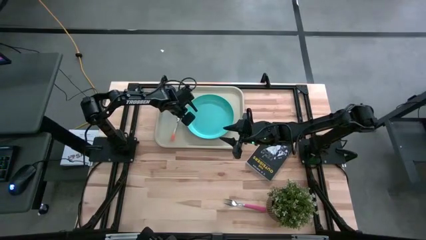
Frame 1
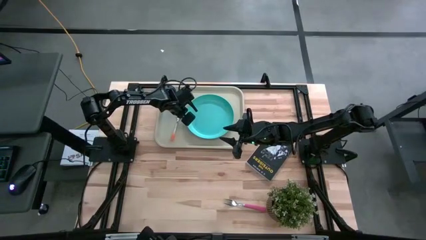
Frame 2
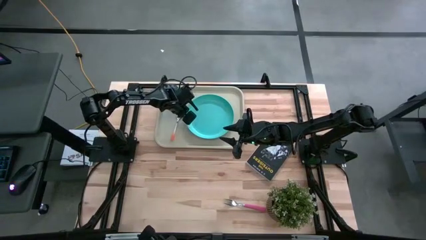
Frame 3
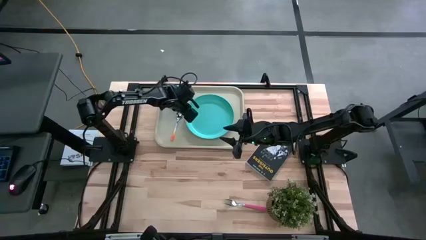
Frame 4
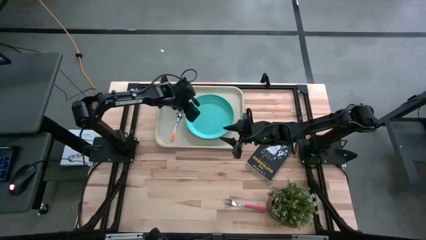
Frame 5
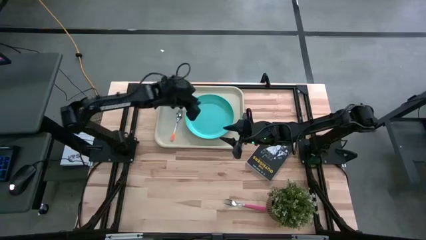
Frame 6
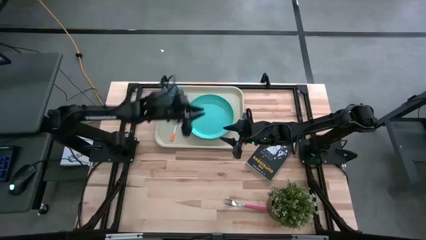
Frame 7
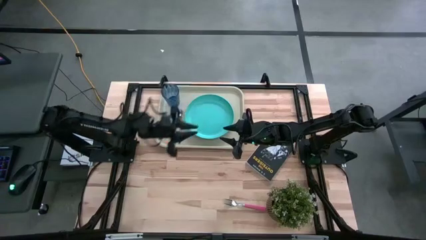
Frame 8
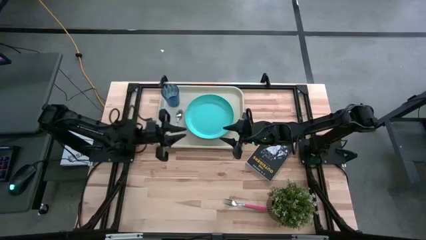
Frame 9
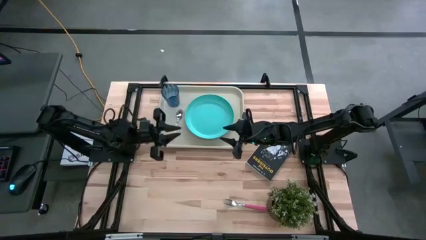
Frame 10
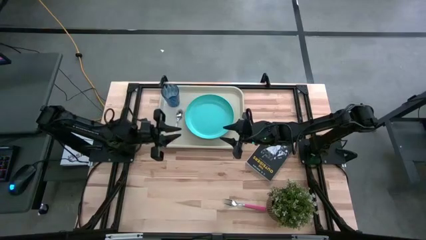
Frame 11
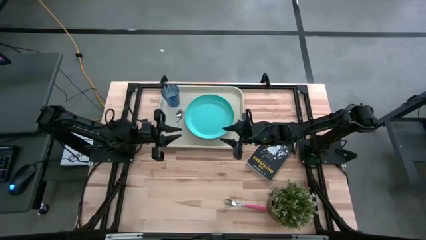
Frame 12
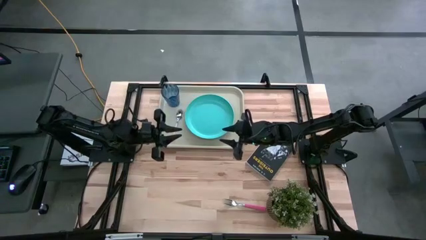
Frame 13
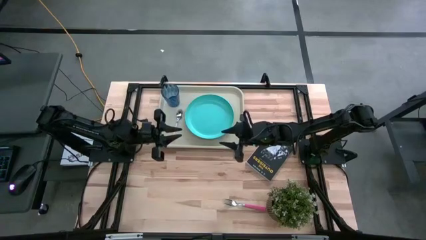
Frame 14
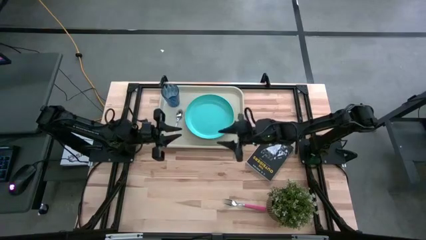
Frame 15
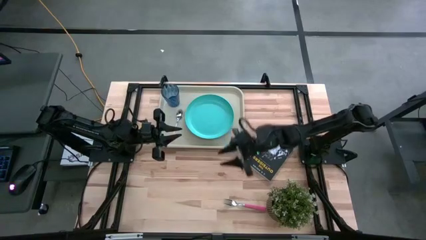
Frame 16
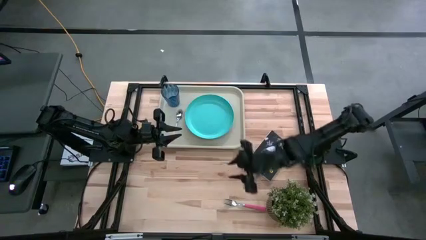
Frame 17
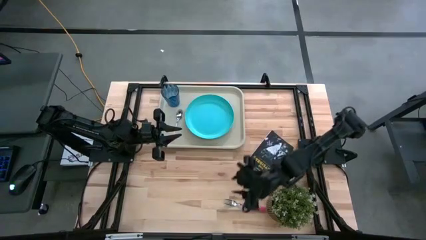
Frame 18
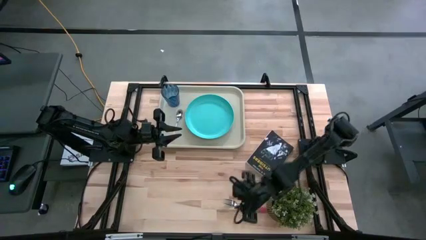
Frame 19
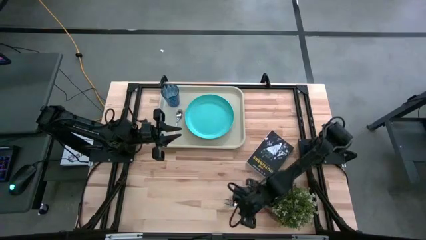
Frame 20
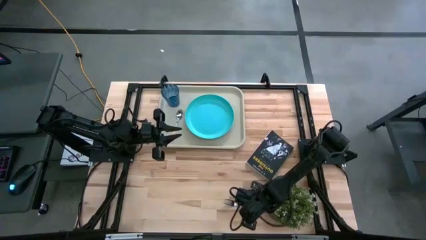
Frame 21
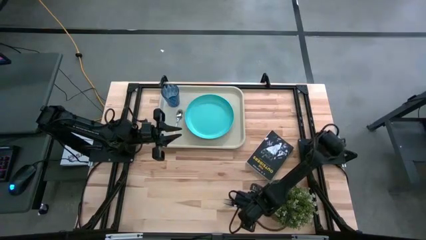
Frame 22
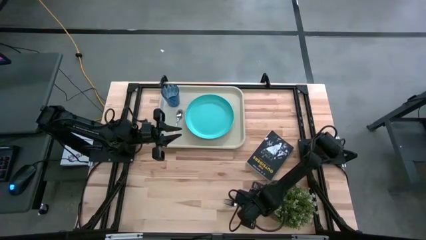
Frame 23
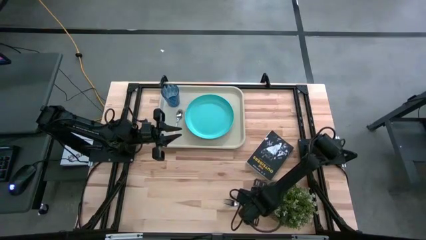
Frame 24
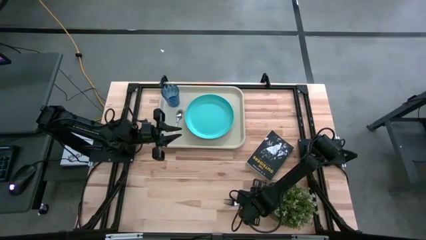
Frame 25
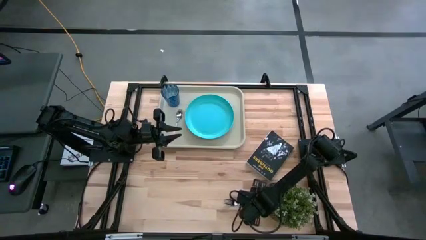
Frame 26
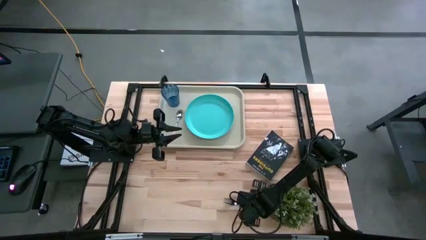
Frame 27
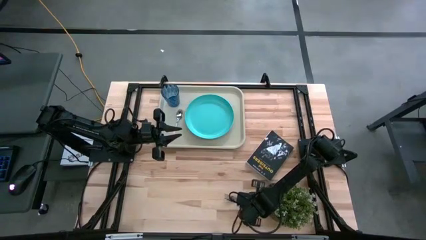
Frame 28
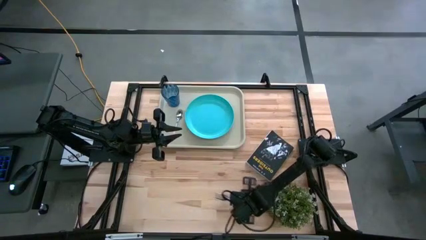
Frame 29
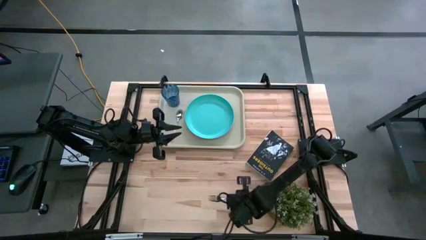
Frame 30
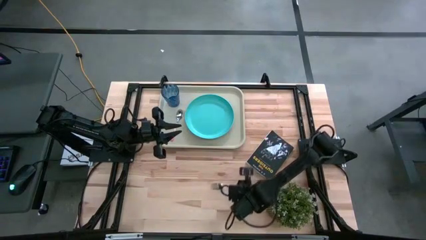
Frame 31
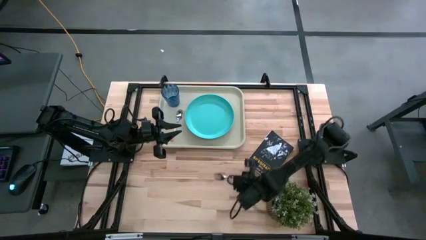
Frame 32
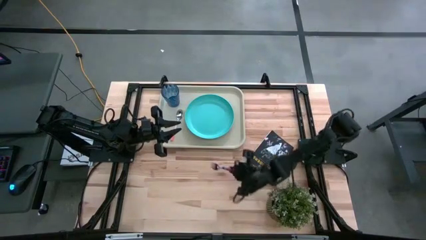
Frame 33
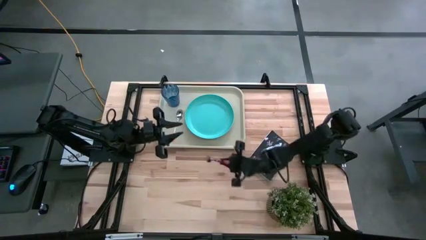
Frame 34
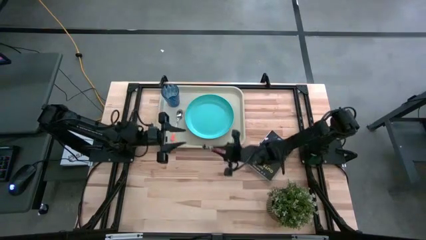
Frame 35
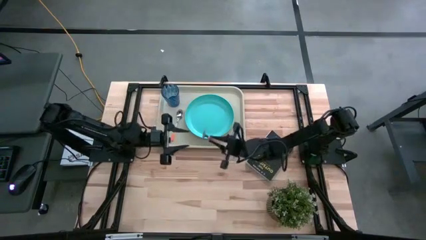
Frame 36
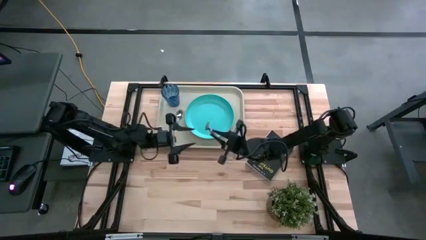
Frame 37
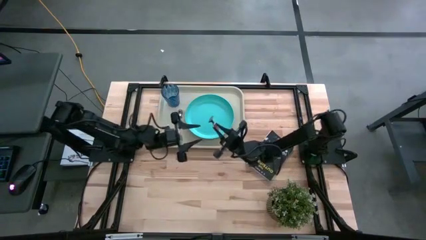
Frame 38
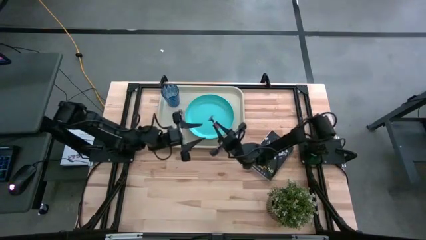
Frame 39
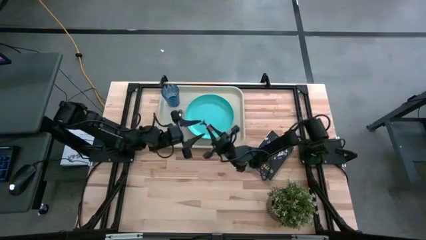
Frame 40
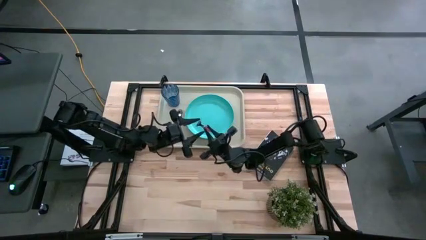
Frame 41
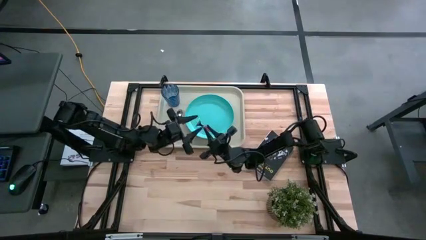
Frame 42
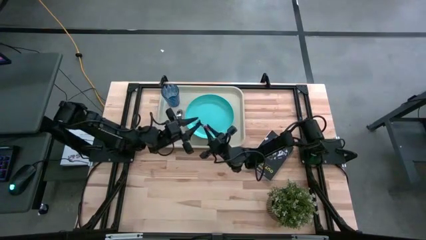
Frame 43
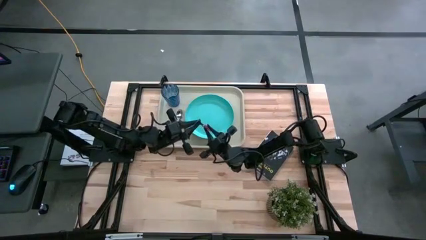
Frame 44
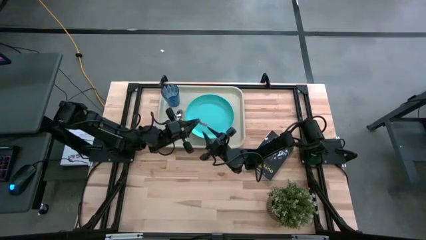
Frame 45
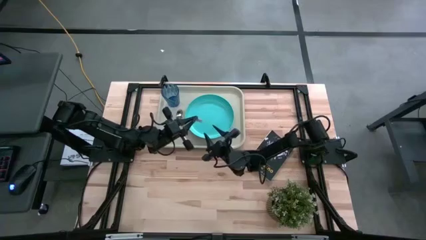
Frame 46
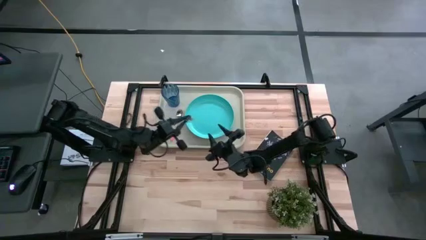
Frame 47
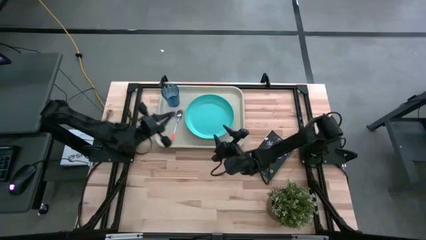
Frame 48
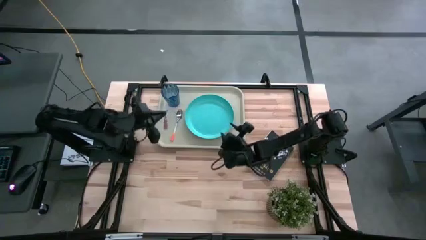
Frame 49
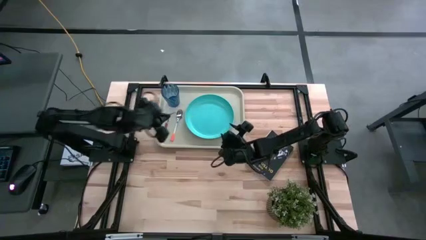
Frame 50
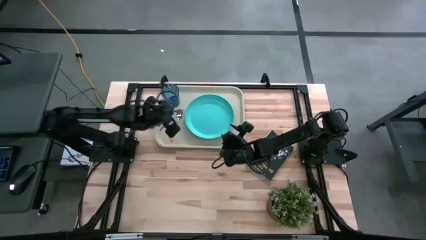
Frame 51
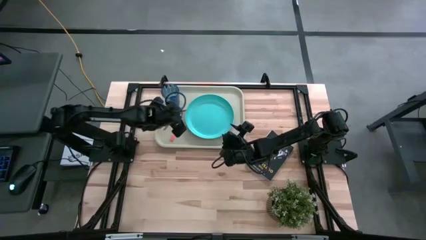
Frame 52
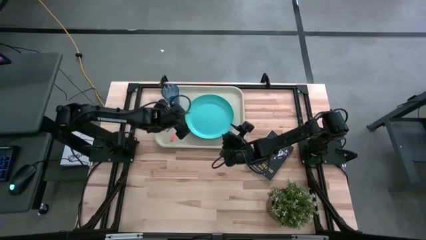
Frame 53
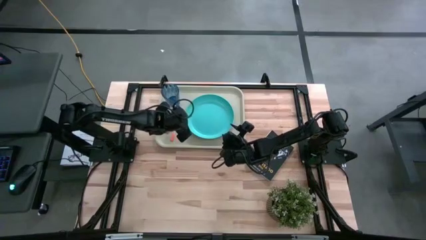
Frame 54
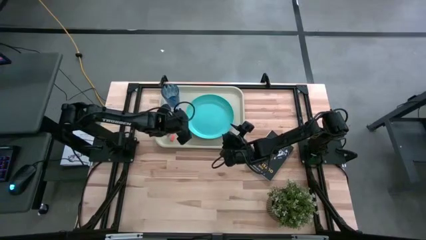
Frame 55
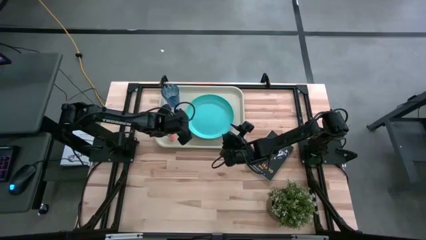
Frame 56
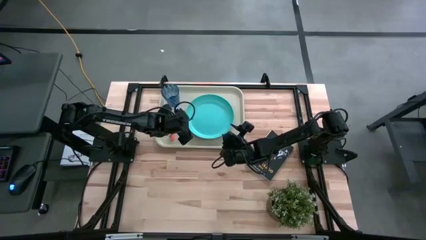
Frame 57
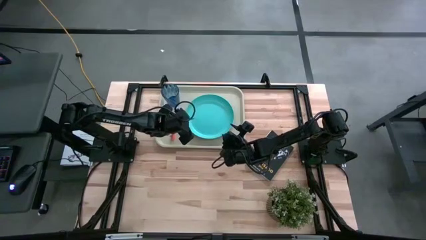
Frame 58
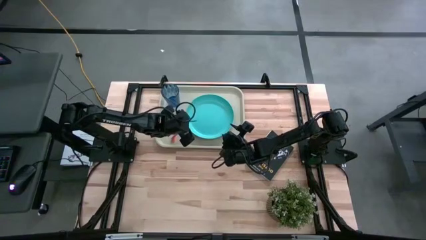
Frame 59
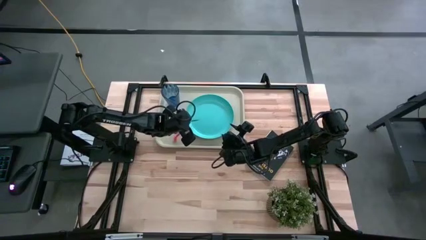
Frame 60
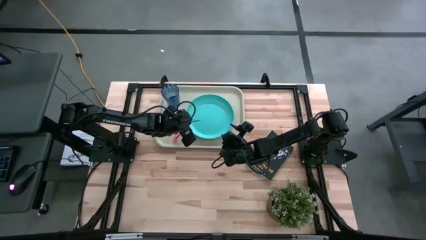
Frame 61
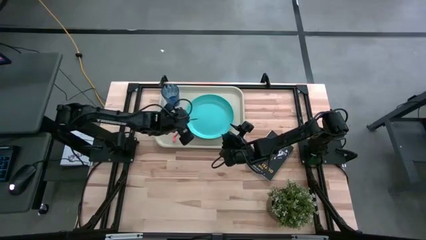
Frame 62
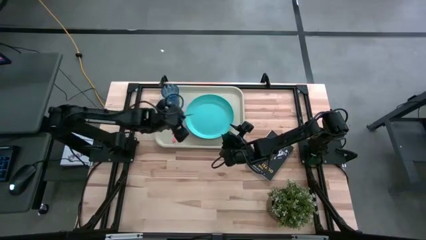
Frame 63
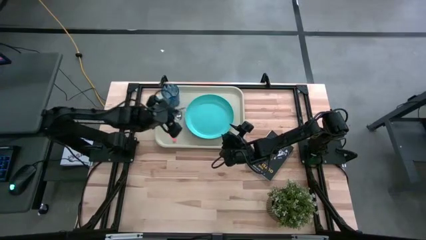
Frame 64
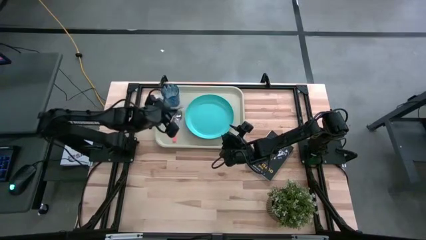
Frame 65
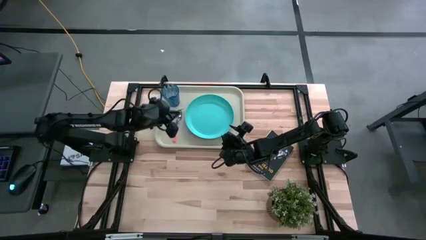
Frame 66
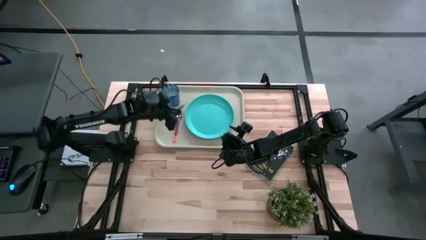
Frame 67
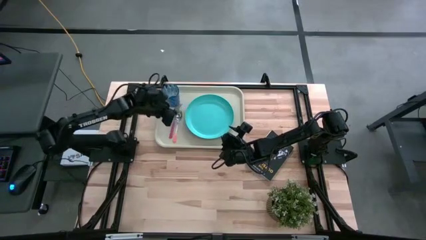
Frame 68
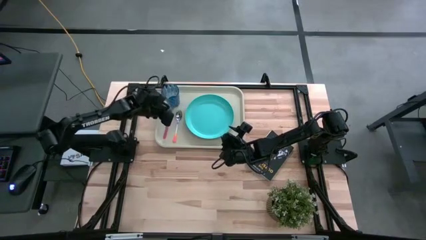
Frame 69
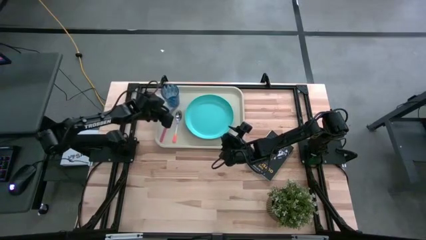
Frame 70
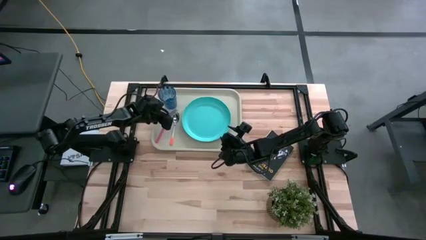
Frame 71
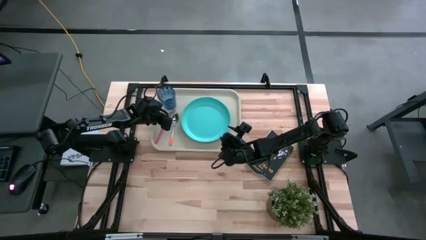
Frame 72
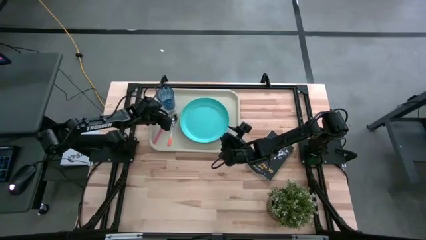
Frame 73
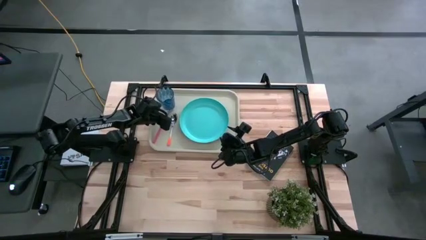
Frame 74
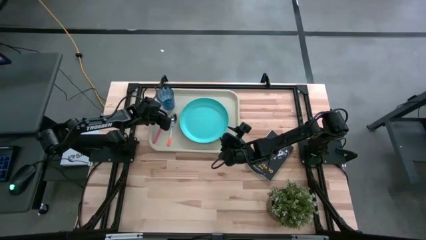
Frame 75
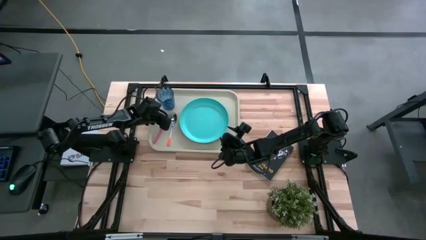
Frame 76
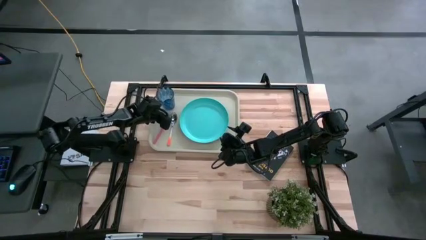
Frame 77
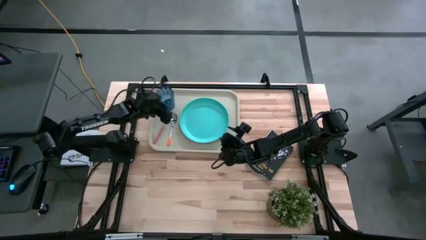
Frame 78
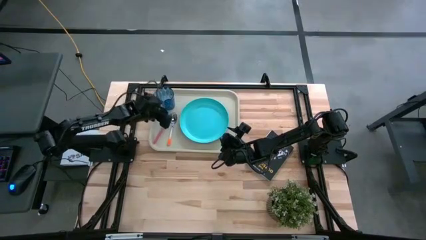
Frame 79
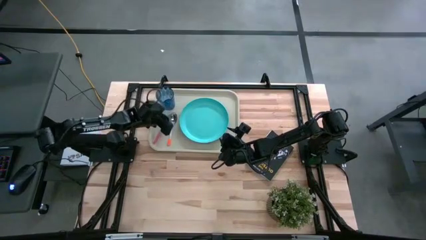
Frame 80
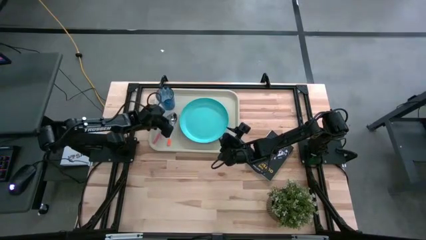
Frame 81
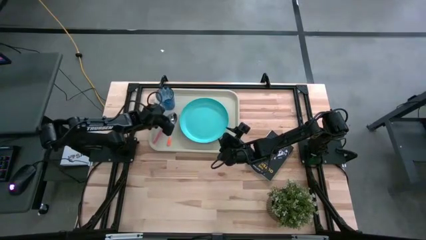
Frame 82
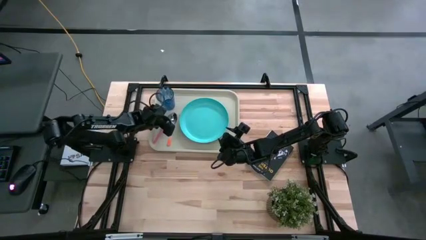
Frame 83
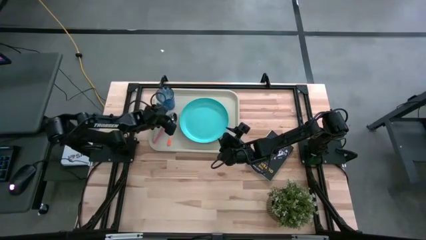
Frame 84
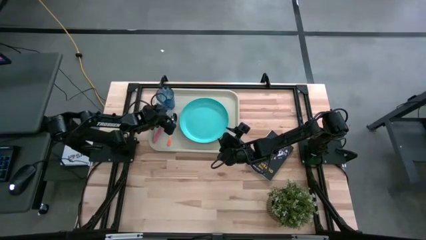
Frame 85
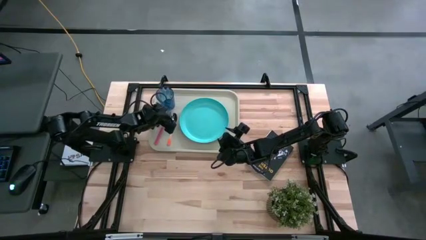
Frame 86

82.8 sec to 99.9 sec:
Task: Pick and place plate/cup/fork/spoon on tray
Put the pink fork on the white tray beside the orange spoon
